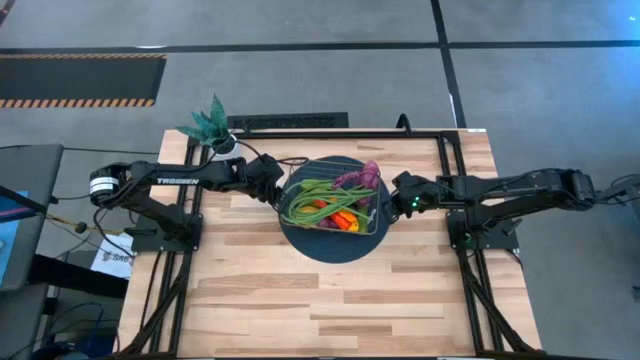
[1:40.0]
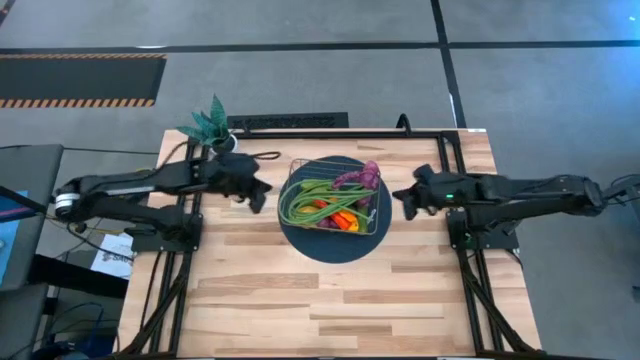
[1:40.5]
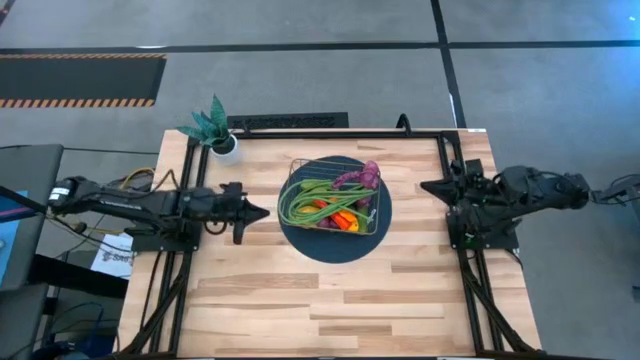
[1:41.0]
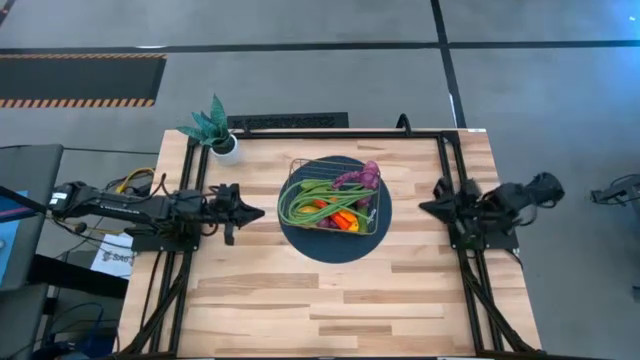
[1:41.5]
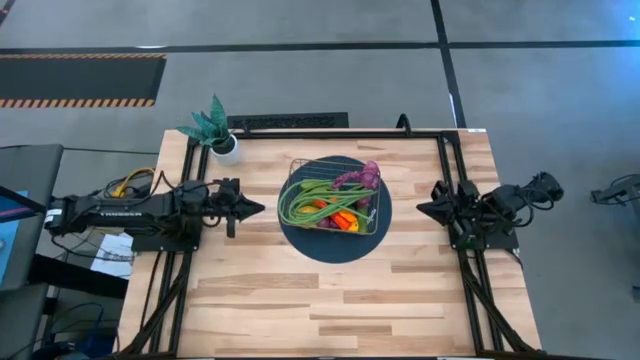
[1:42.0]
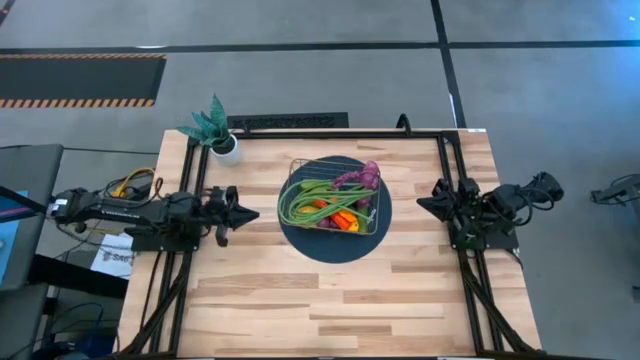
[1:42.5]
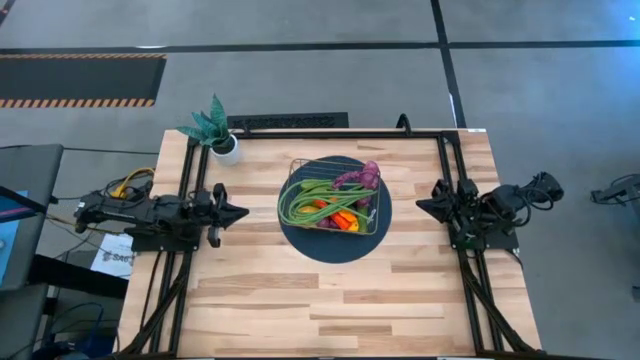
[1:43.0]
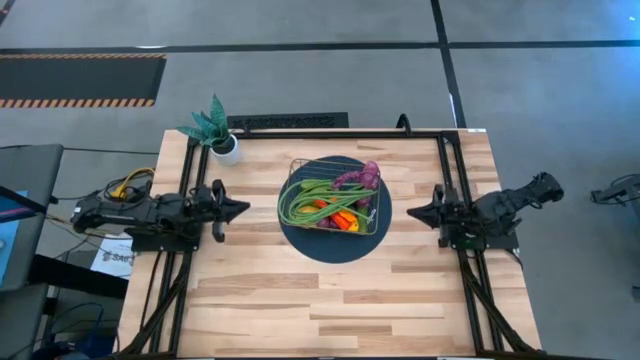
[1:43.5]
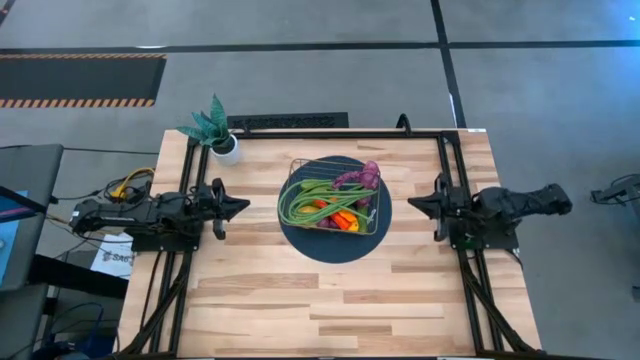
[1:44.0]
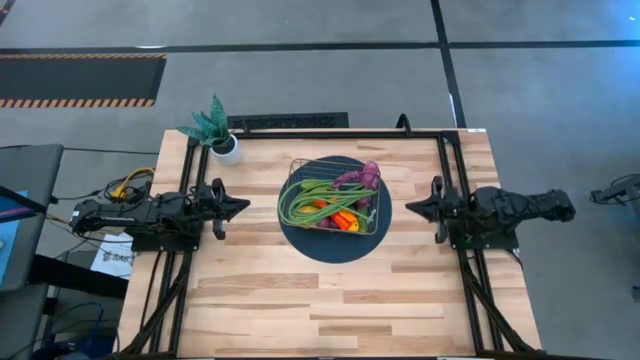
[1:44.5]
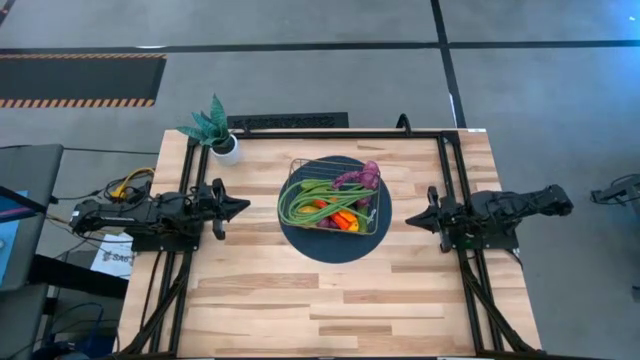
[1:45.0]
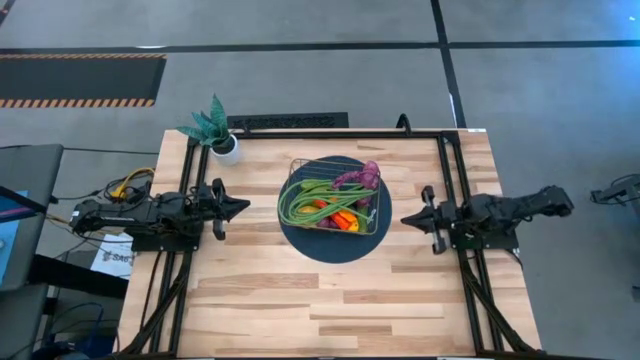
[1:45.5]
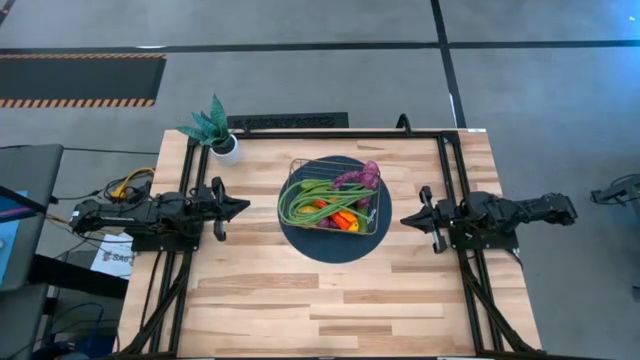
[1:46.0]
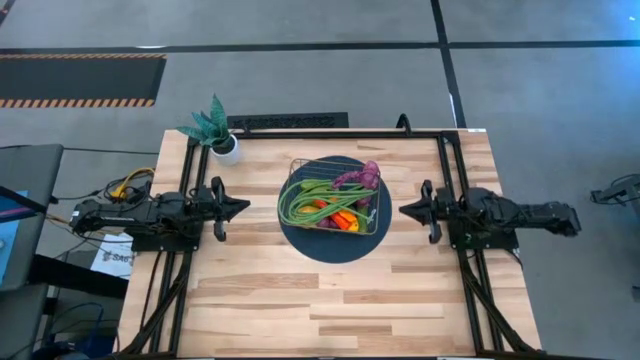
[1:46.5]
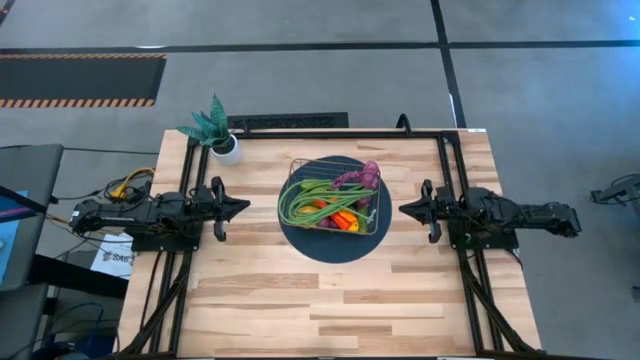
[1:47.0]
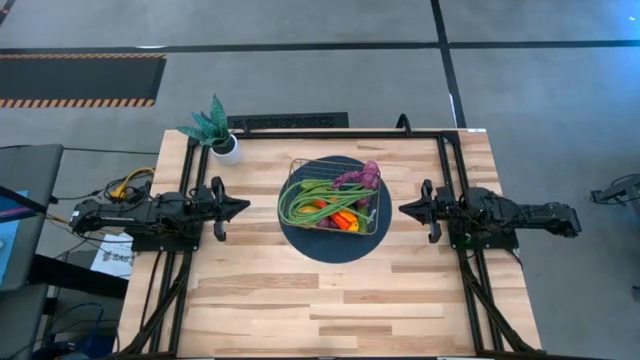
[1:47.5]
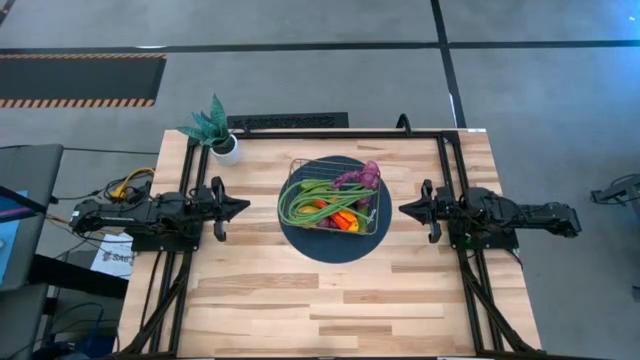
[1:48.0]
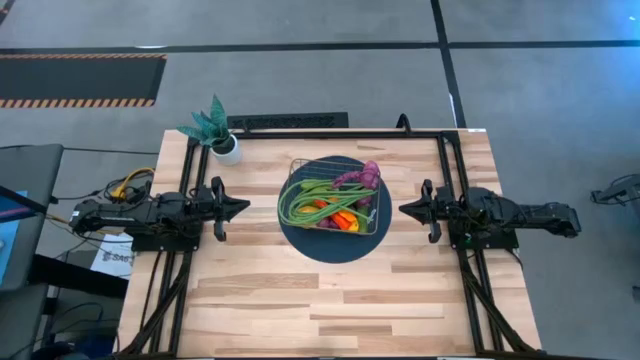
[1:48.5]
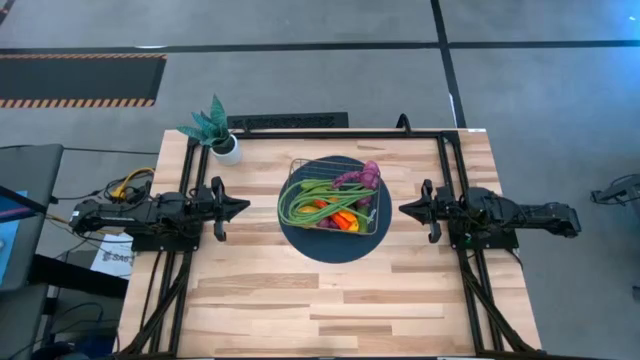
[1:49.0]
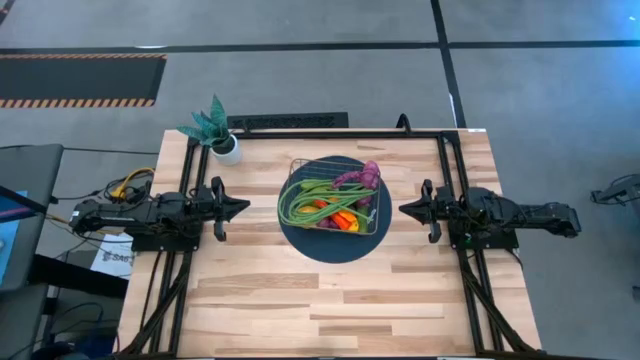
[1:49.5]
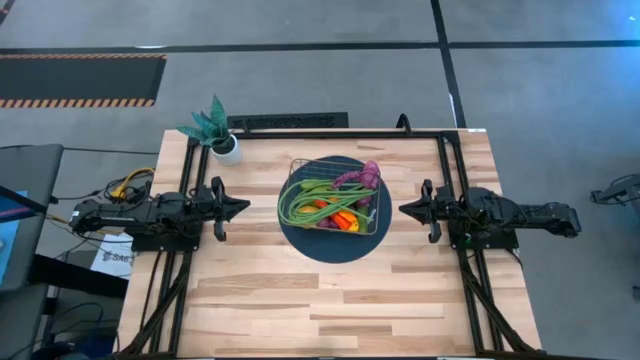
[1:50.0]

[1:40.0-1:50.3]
Task: Build produce basket
Return to Home Position

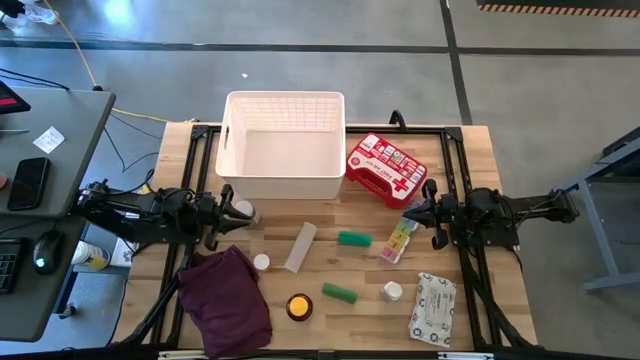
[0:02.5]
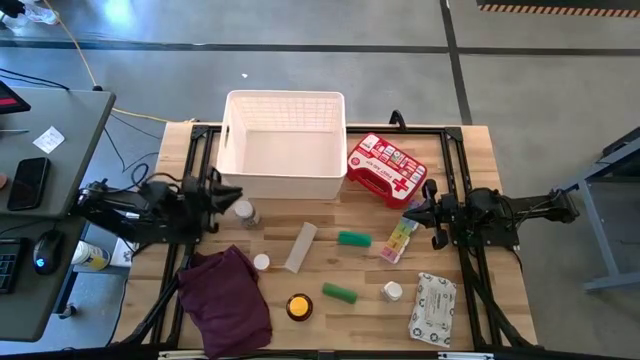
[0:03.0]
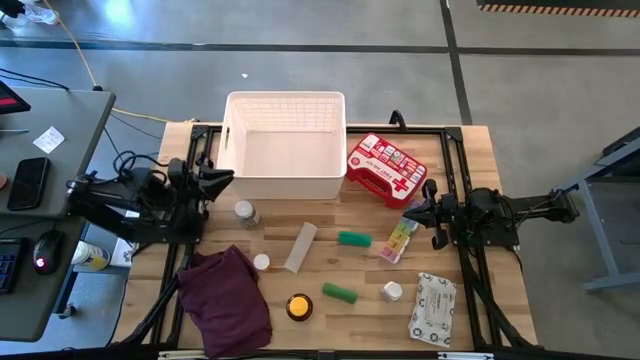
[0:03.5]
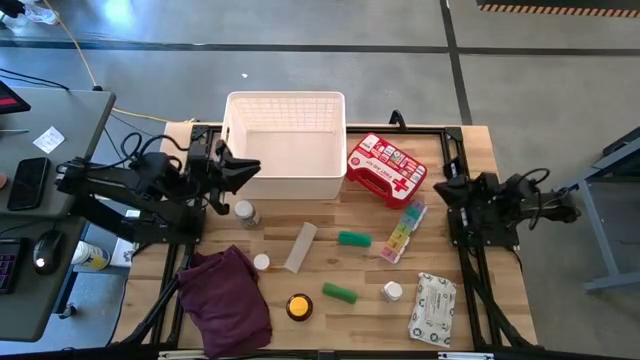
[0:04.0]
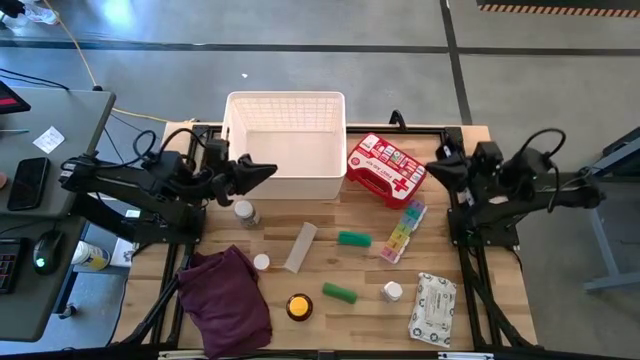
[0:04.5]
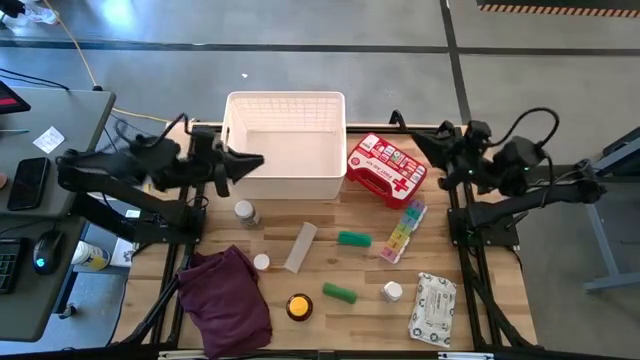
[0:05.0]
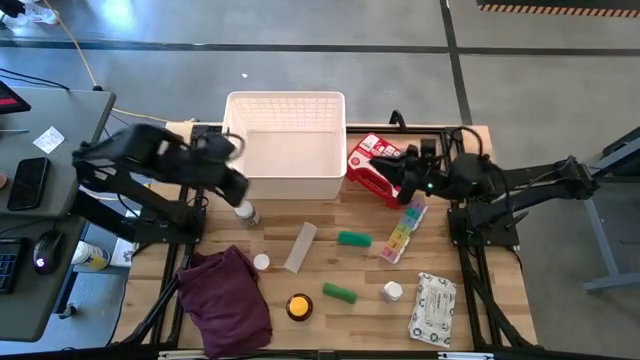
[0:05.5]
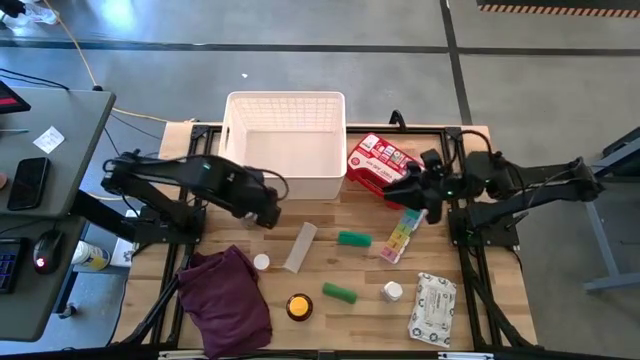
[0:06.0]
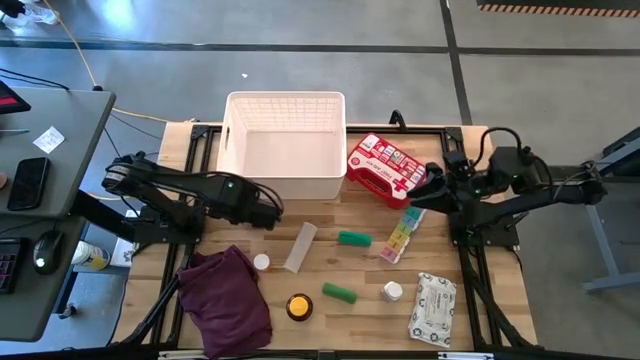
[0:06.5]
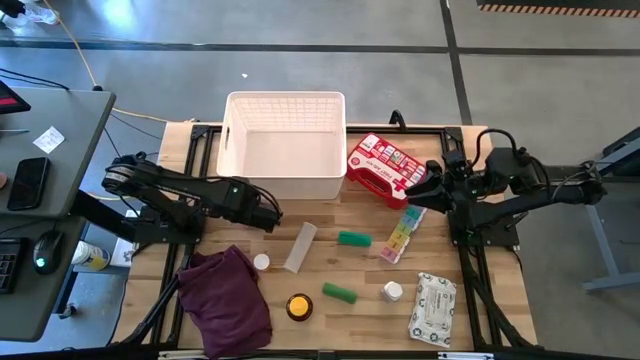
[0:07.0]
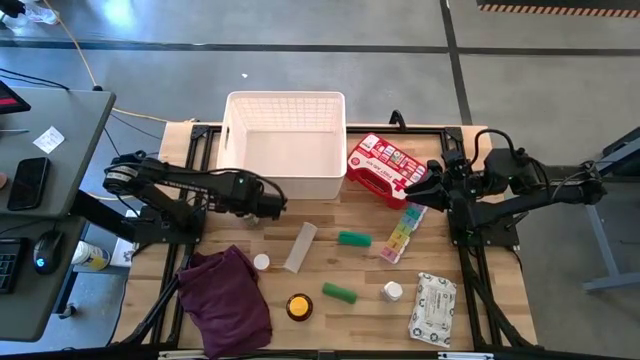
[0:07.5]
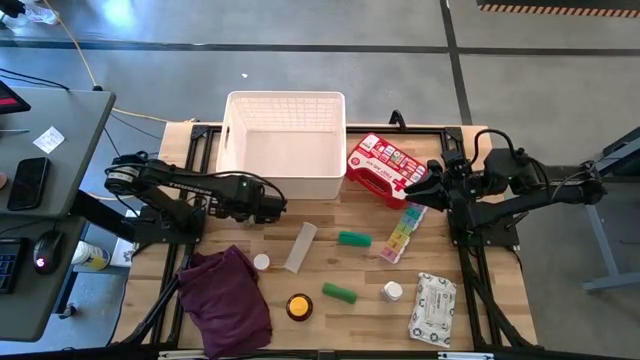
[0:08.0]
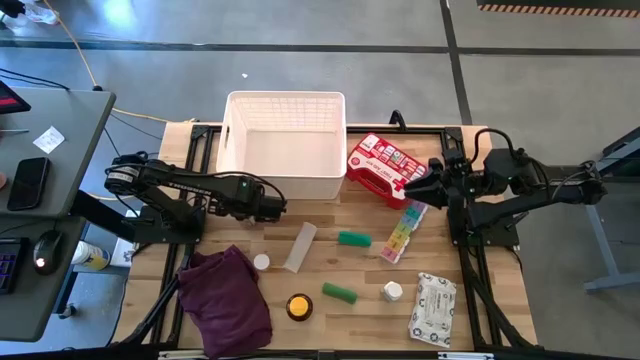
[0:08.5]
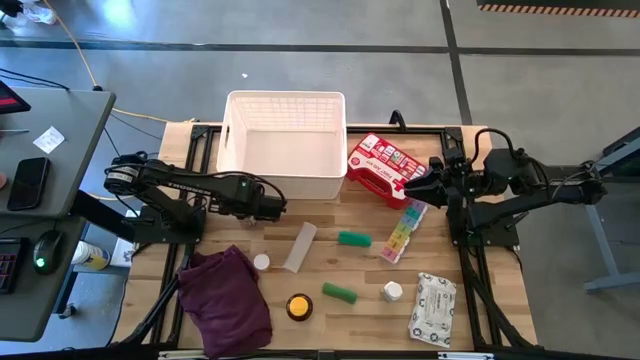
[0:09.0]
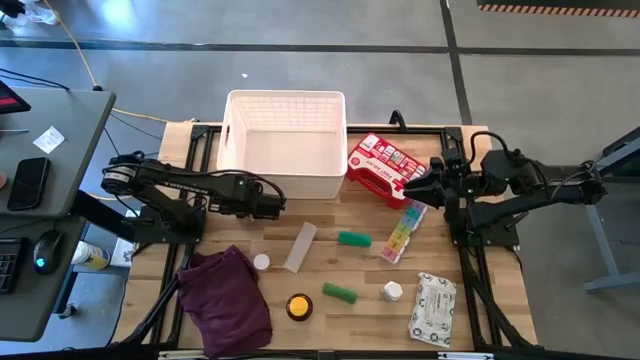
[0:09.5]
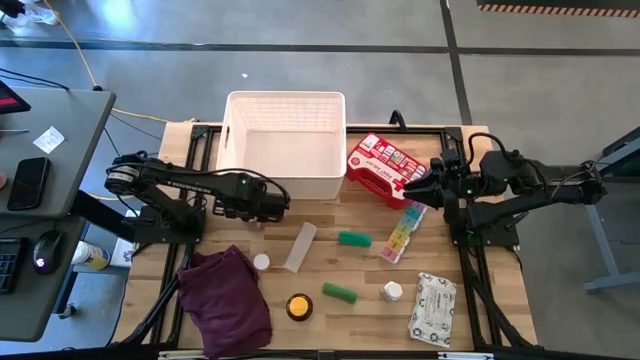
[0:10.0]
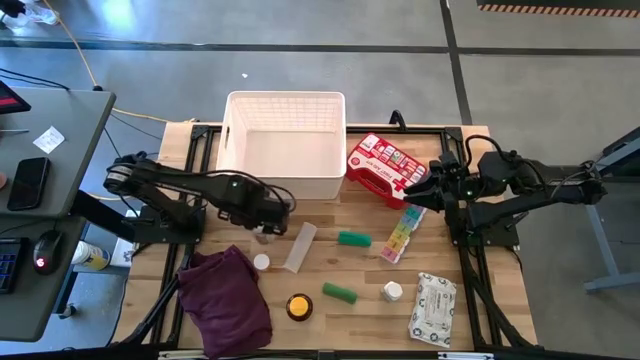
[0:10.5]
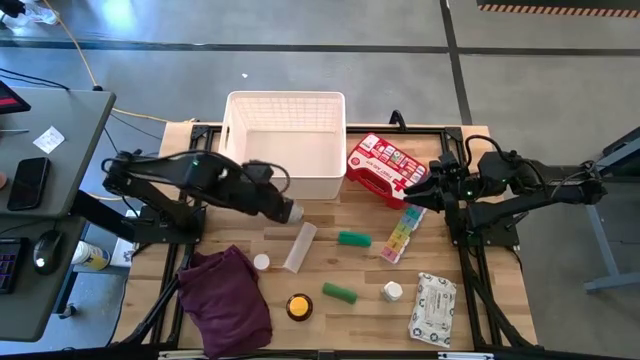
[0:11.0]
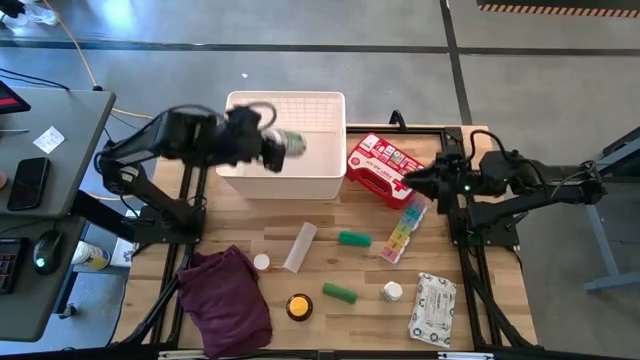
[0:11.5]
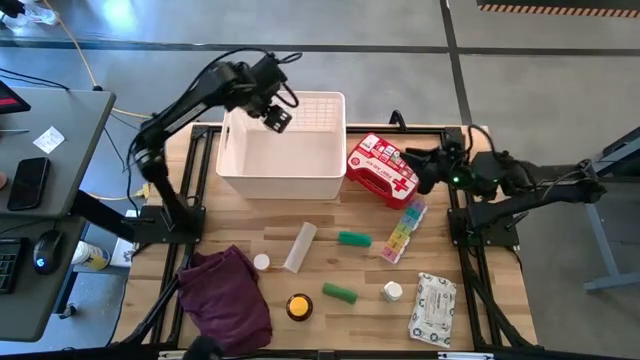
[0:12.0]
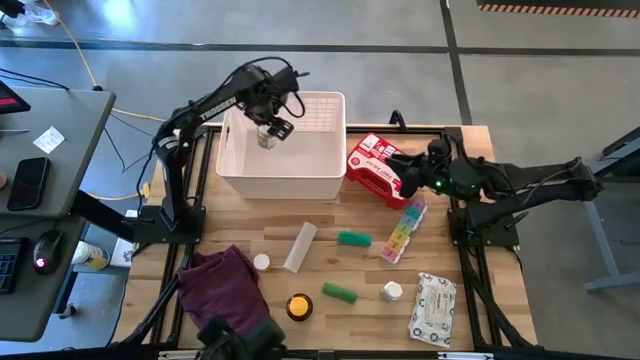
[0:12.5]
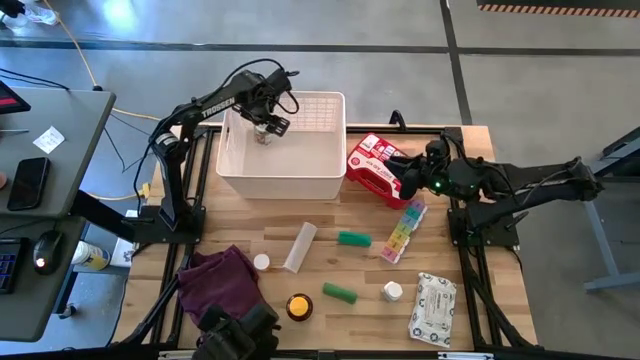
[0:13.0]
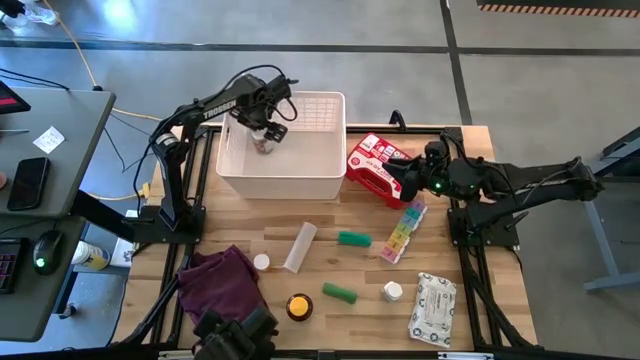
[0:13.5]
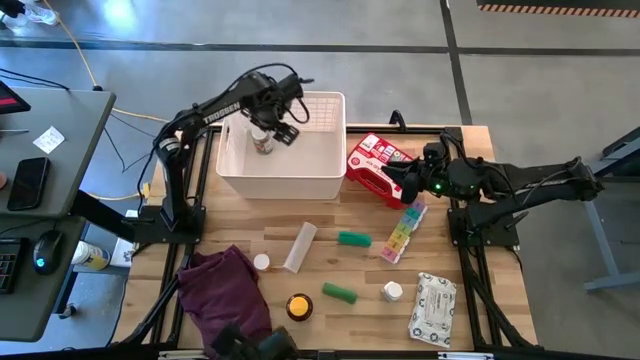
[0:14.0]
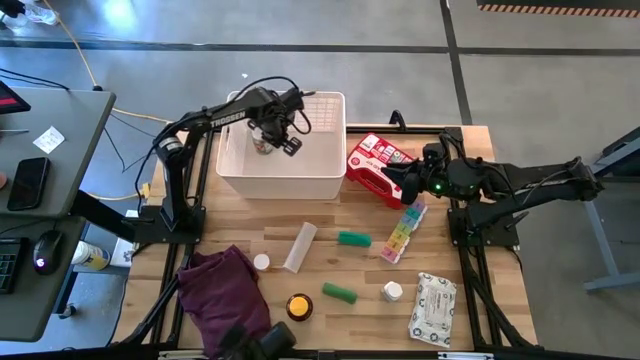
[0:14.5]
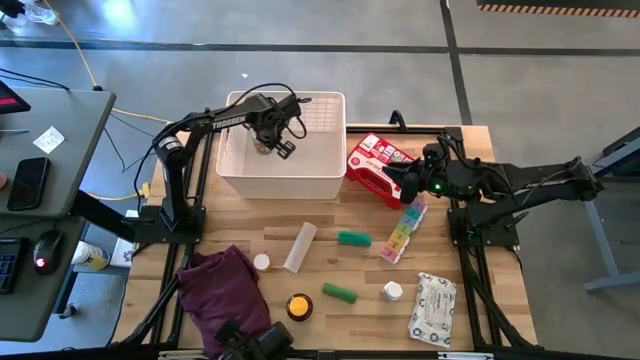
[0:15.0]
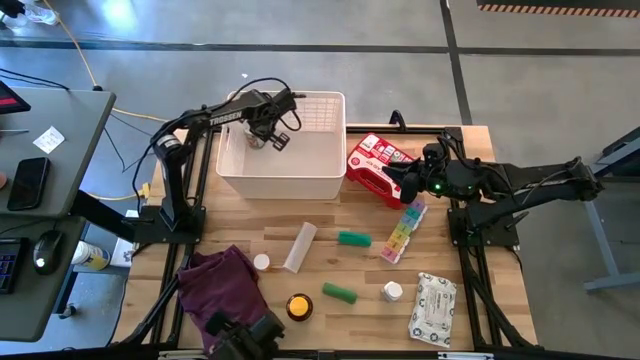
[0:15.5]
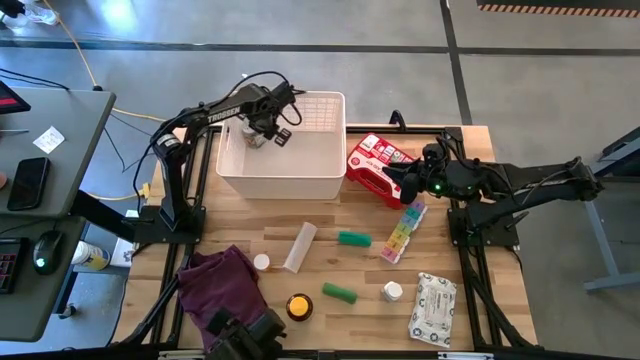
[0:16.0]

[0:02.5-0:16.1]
Task: Pick & place medical supplies in basket/bin
Put the white and green pill bottle into the bin
